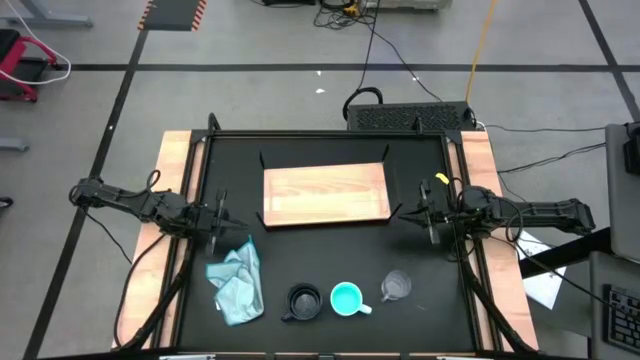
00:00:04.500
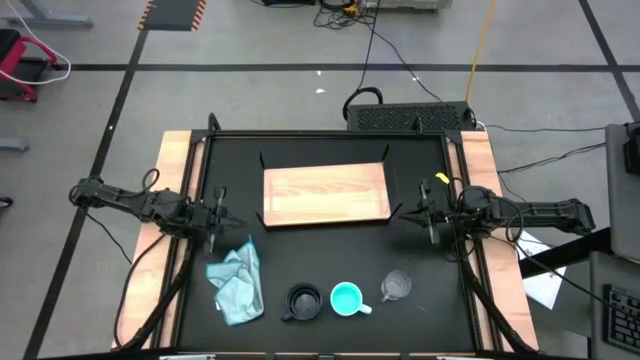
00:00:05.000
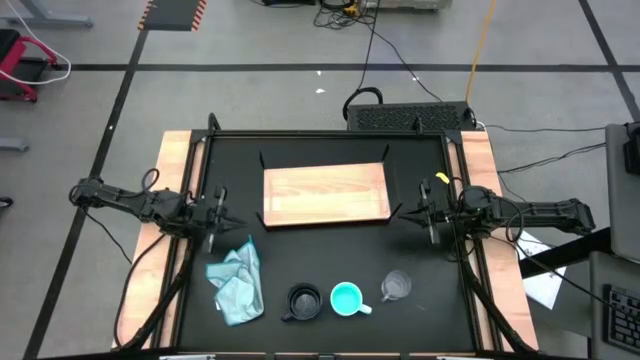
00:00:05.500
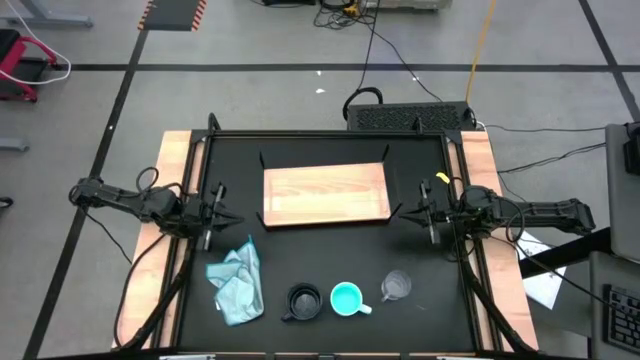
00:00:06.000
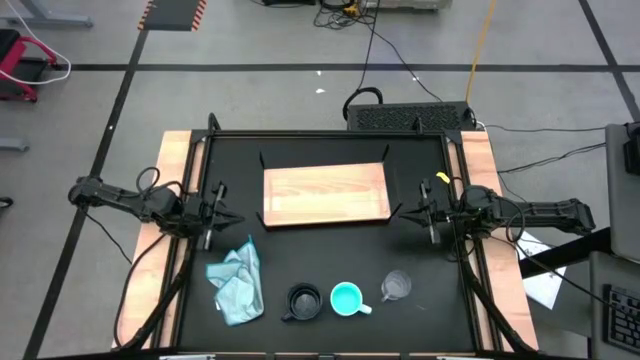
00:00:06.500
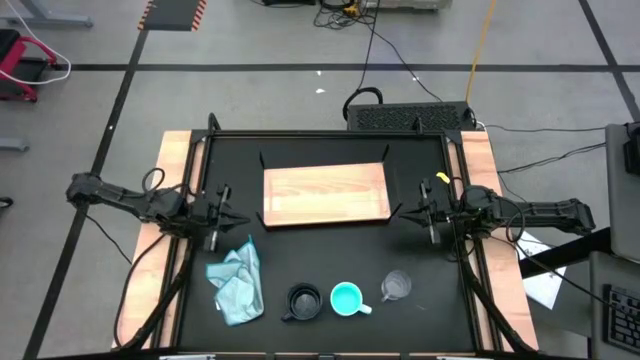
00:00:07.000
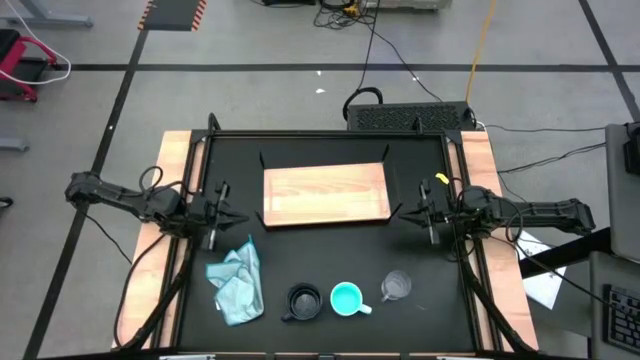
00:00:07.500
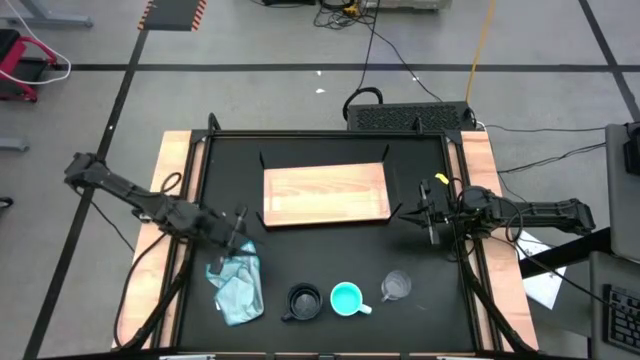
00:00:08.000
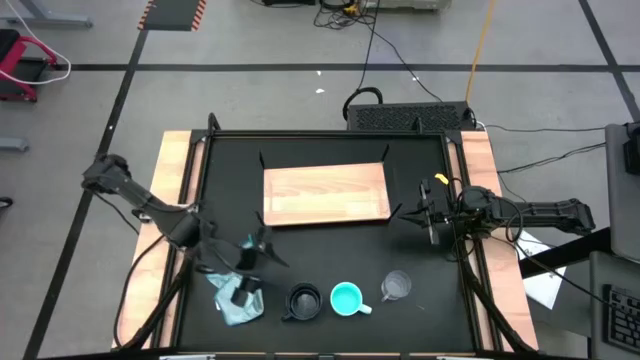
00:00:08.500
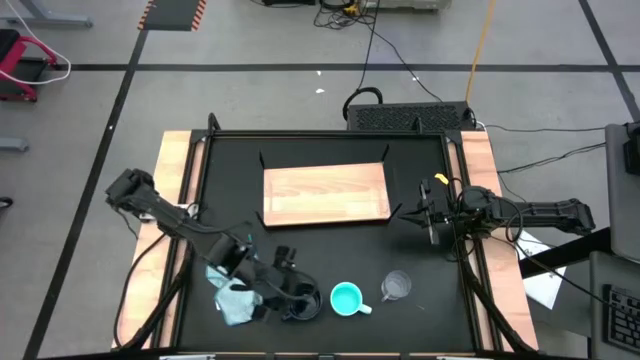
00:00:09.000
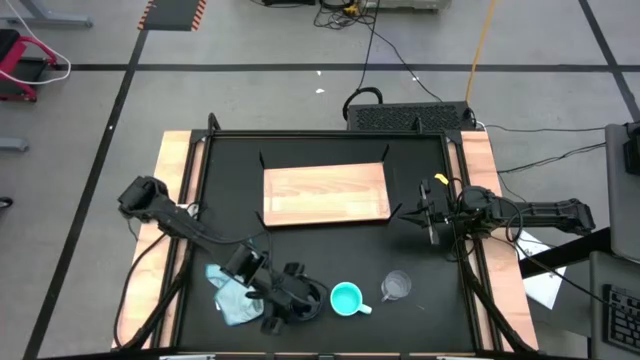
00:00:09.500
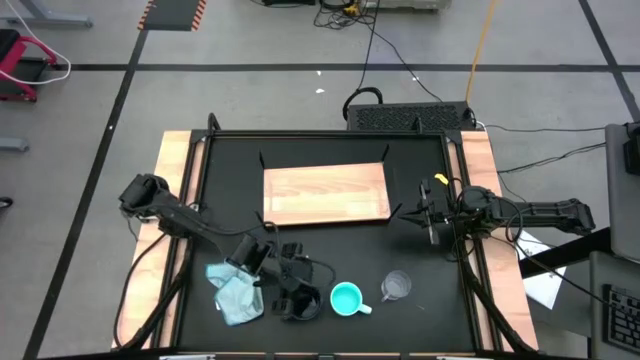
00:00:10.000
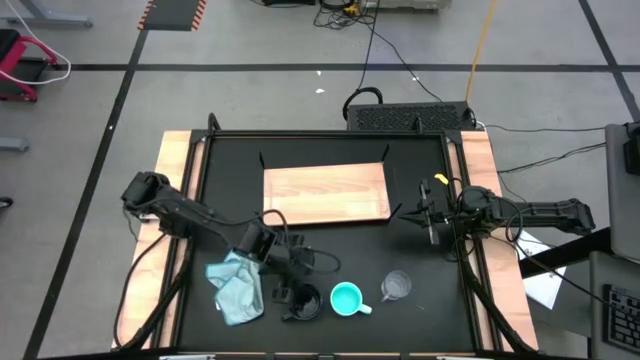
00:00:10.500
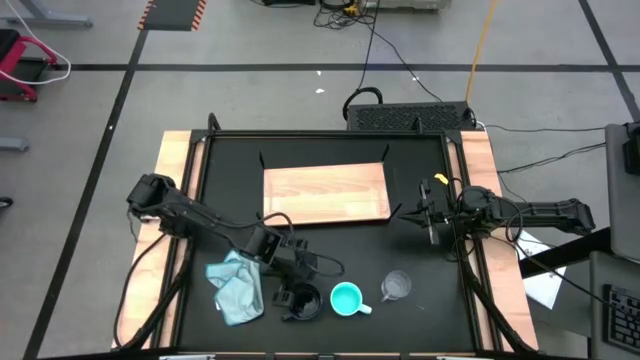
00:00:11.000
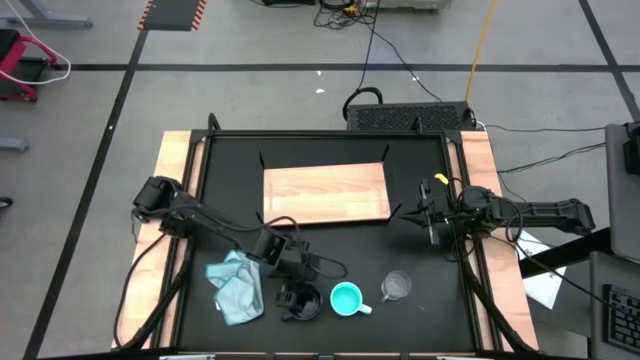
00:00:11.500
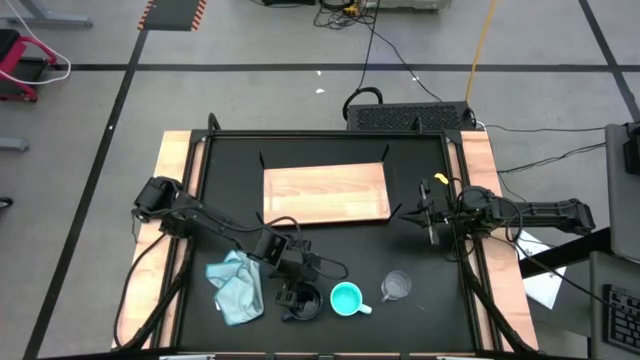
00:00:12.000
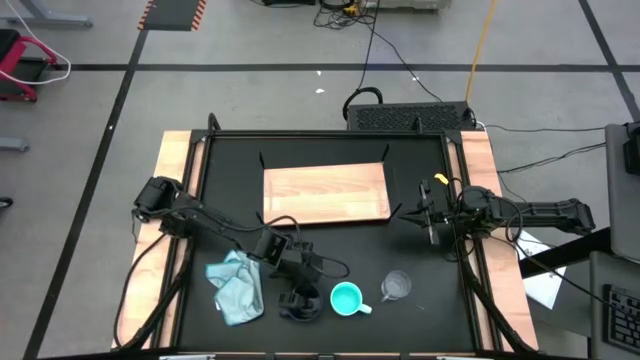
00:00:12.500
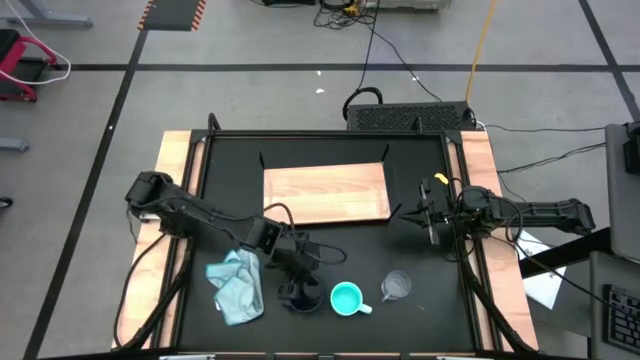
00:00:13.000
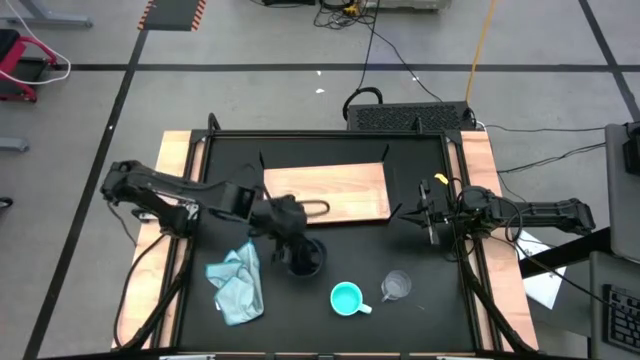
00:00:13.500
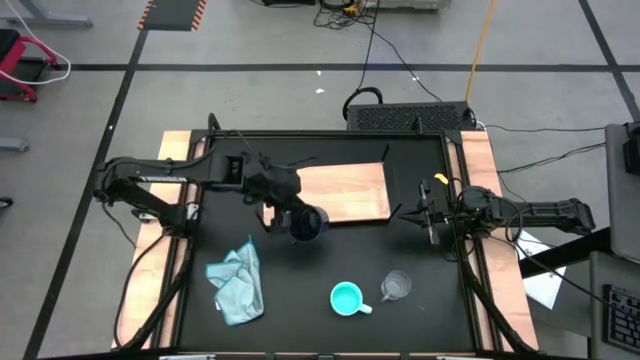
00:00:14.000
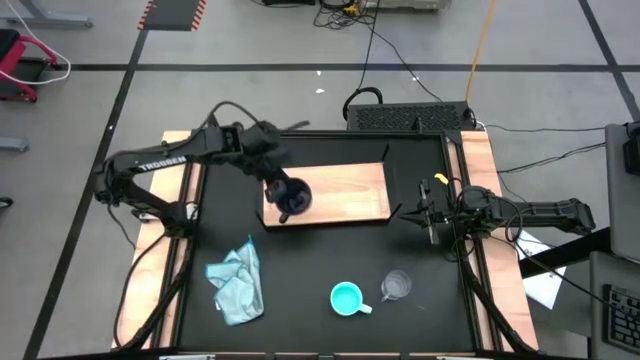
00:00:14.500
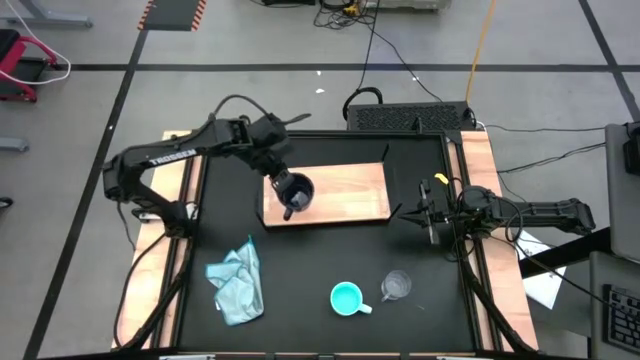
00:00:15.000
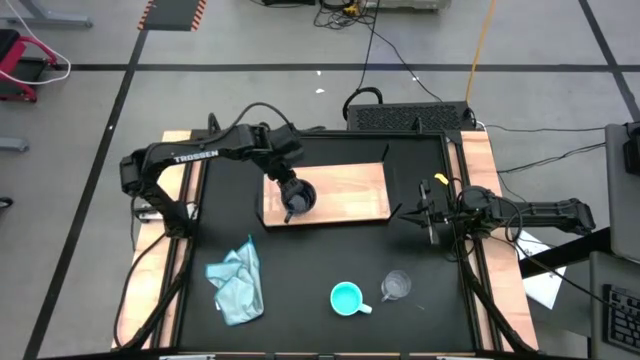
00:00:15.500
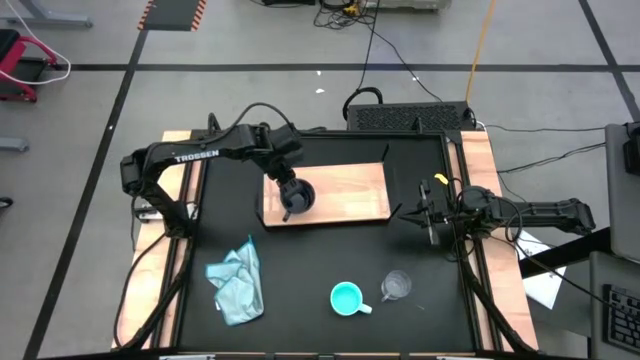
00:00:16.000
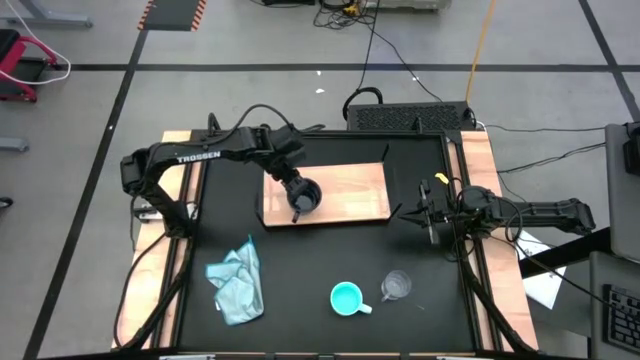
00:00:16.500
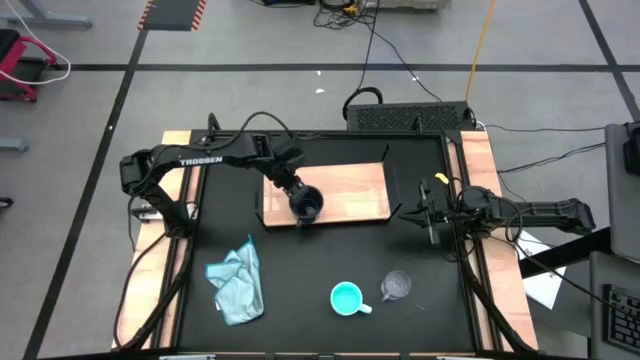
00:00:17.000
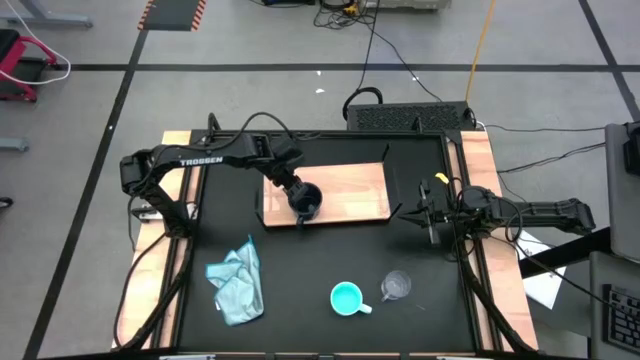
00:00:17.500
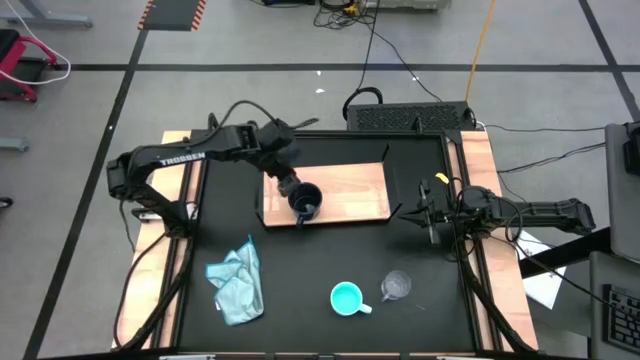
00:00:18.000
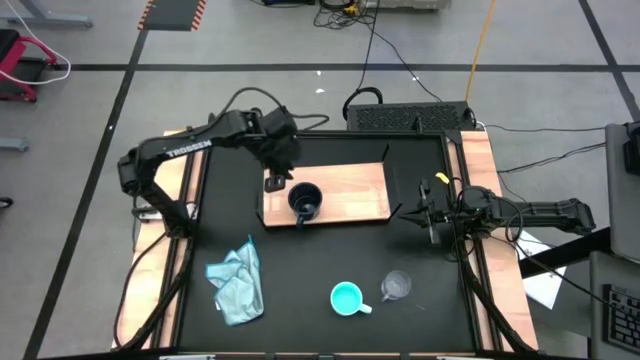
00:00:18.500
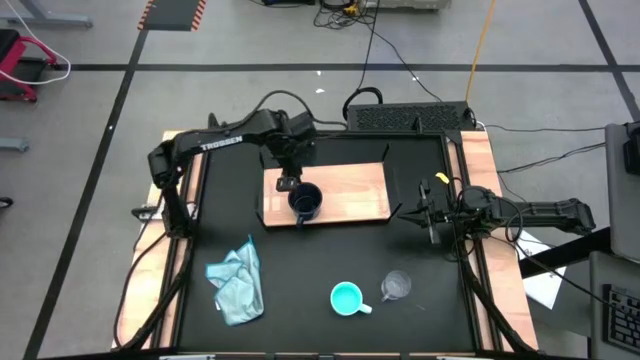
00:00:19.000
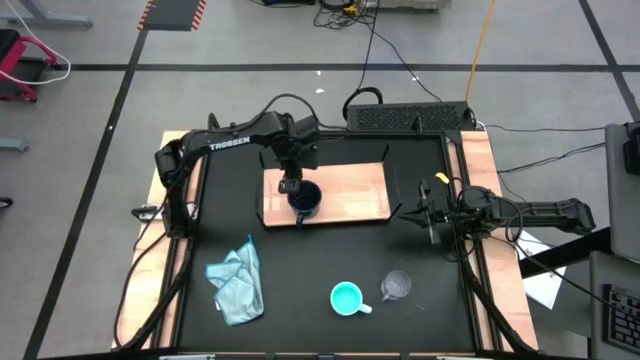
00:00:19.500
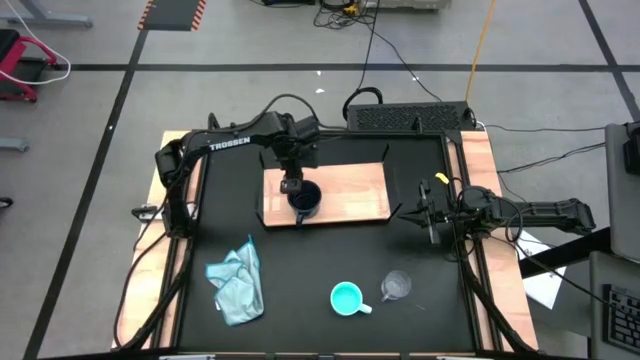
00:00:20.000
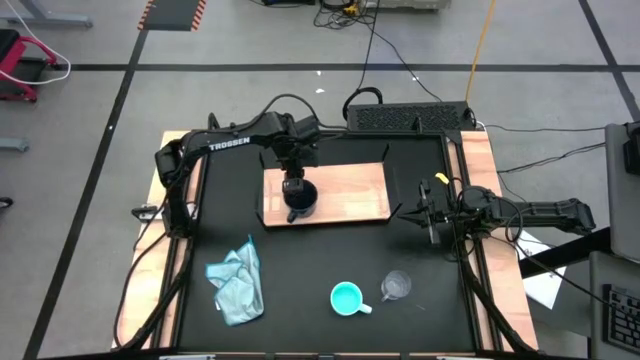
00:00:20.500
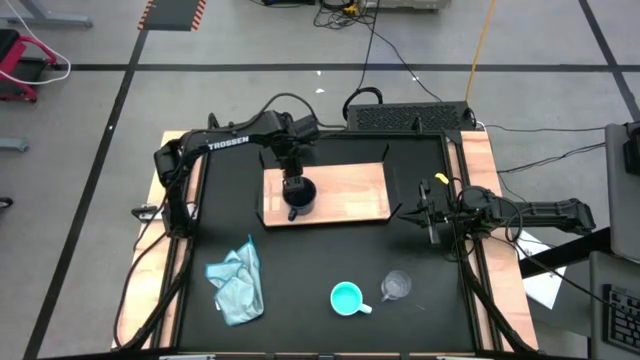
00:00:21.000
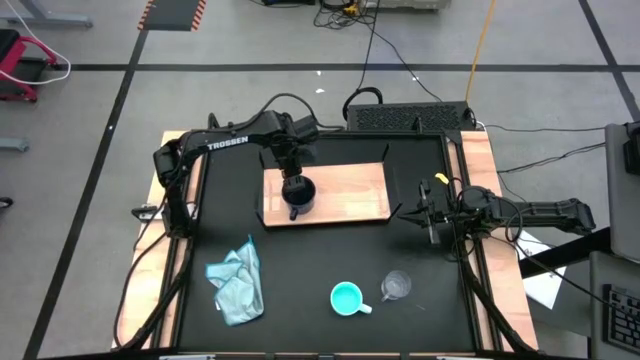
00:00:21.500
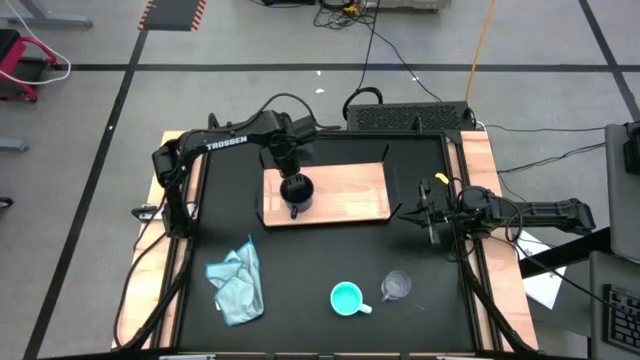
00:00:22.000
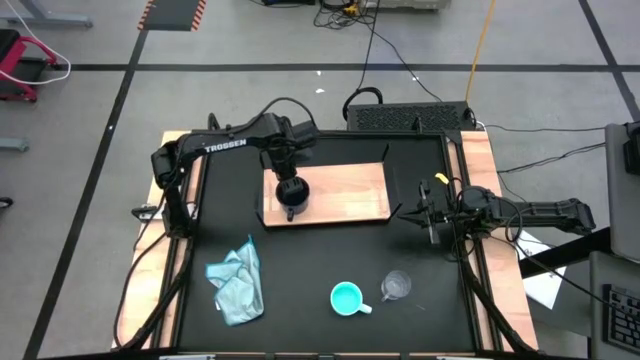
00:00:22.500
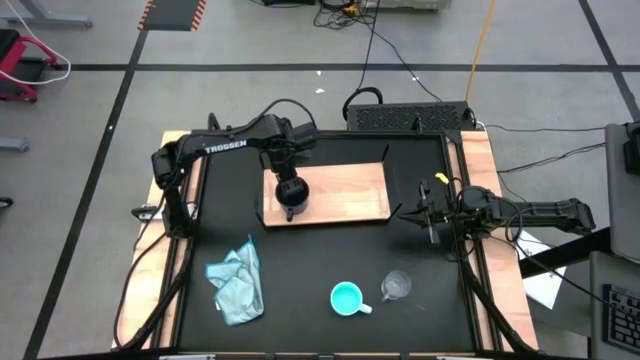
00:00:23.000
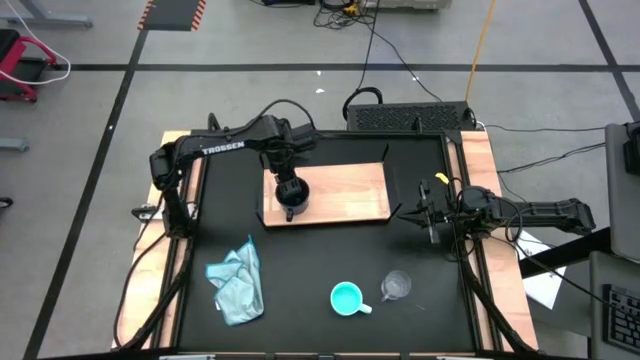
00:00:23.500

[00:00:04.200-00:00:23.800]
Task: Stack small to large cups/mugs on shelf
Put the dark blue mug to the left on the shelf
